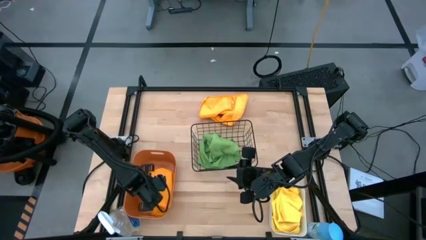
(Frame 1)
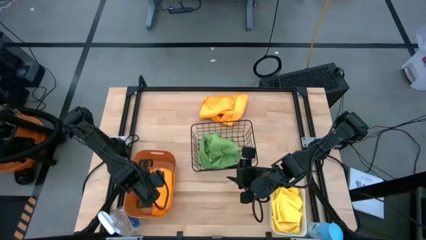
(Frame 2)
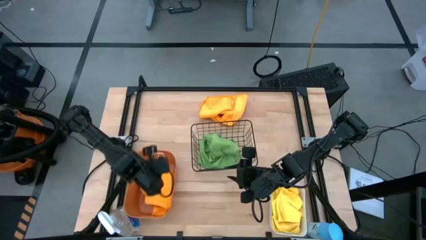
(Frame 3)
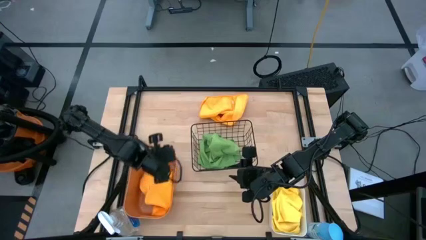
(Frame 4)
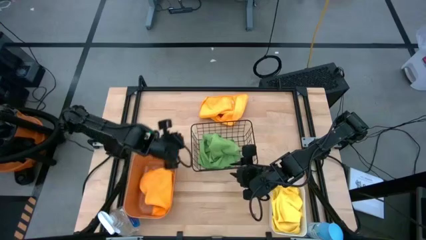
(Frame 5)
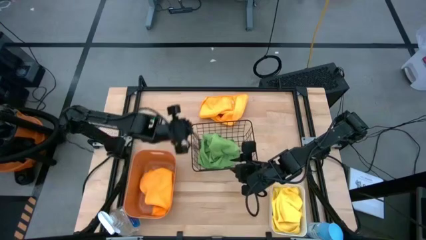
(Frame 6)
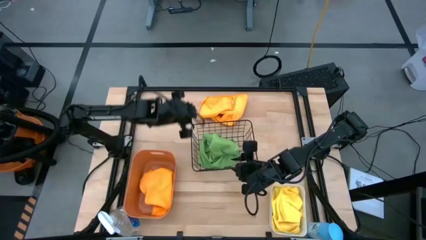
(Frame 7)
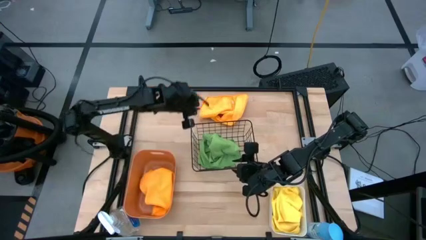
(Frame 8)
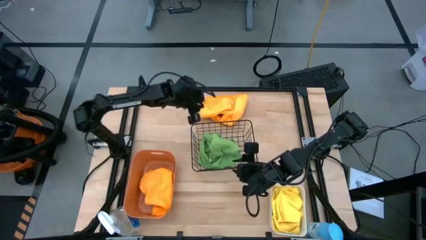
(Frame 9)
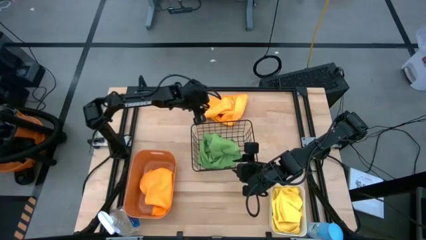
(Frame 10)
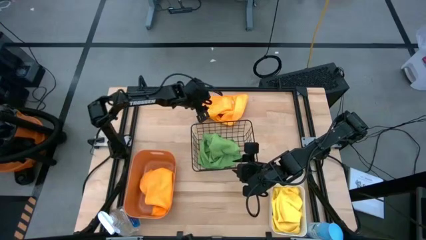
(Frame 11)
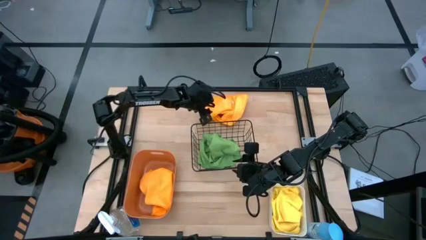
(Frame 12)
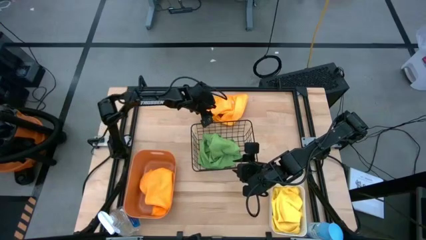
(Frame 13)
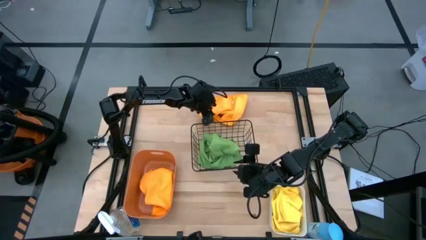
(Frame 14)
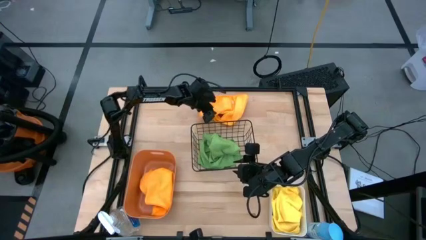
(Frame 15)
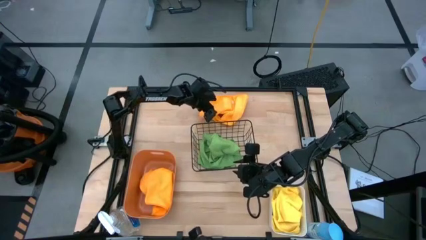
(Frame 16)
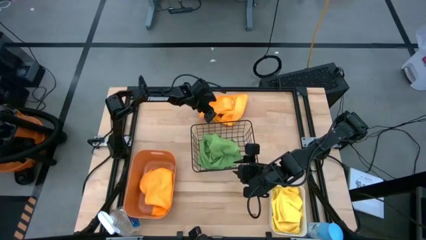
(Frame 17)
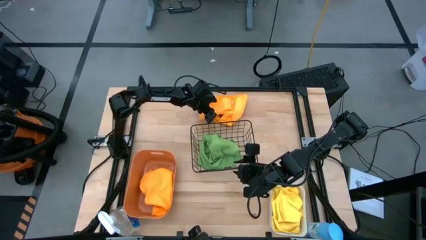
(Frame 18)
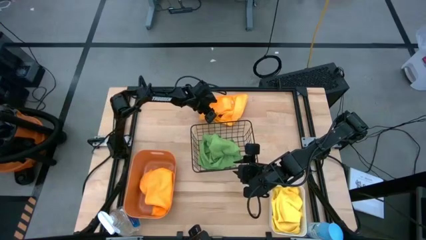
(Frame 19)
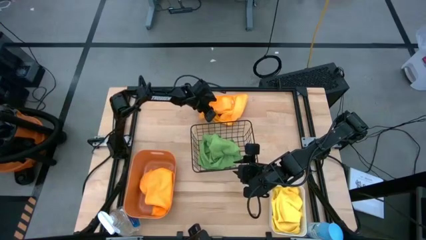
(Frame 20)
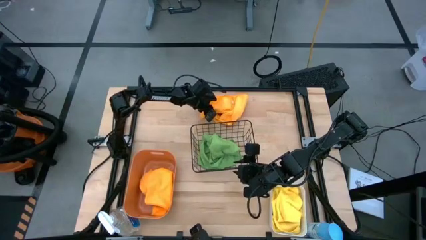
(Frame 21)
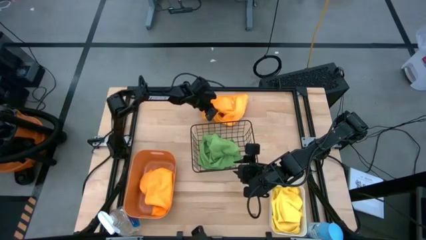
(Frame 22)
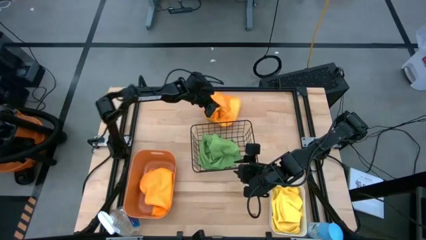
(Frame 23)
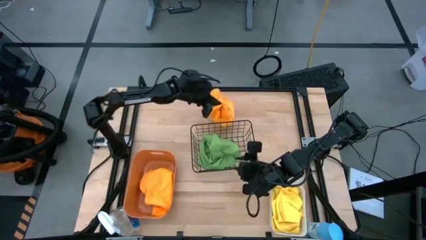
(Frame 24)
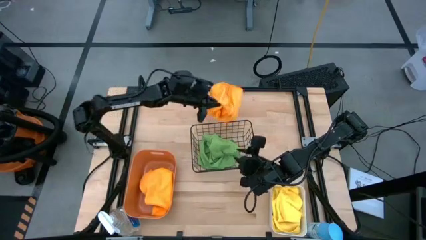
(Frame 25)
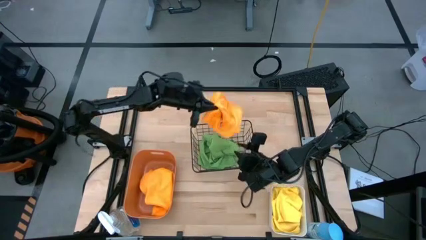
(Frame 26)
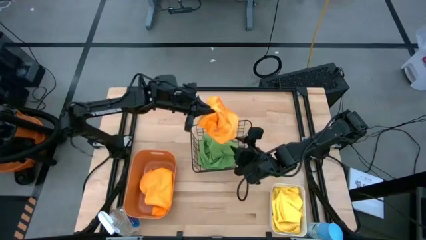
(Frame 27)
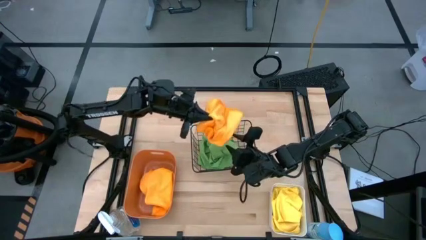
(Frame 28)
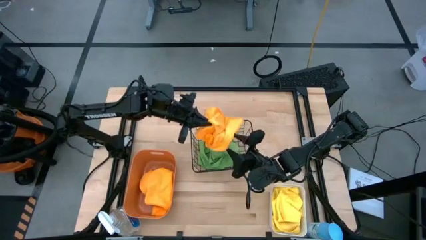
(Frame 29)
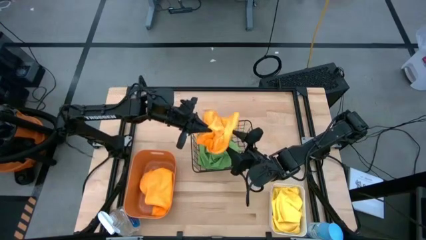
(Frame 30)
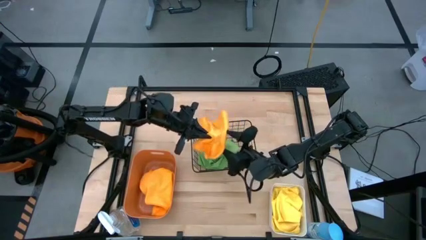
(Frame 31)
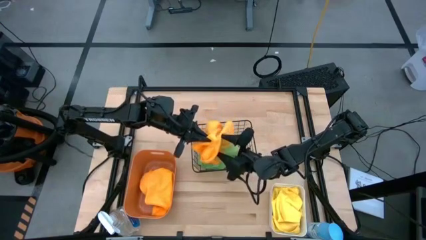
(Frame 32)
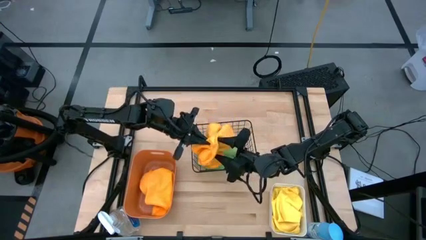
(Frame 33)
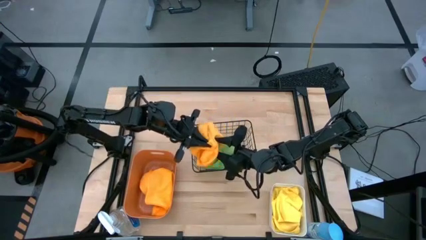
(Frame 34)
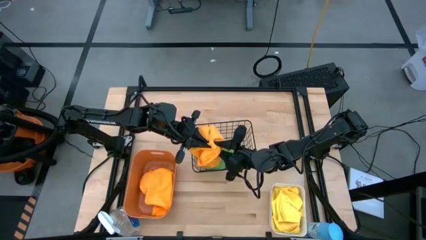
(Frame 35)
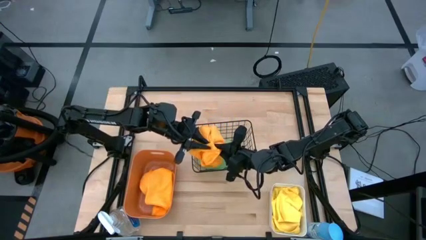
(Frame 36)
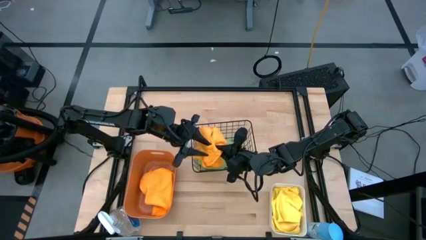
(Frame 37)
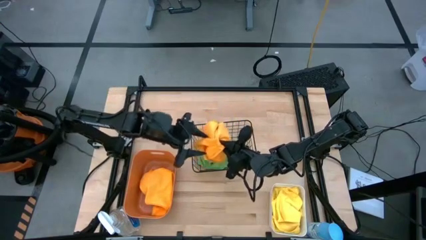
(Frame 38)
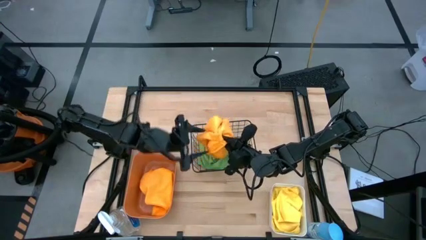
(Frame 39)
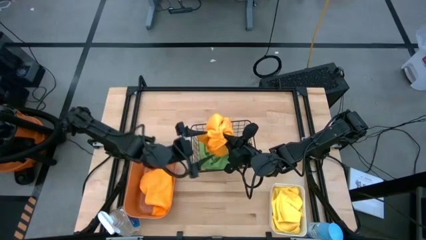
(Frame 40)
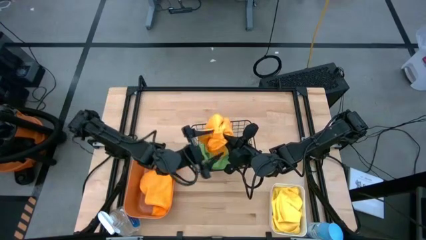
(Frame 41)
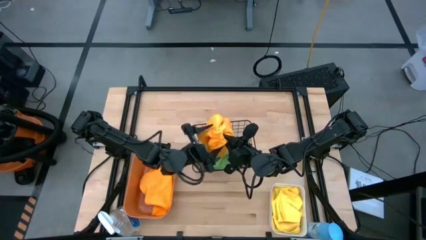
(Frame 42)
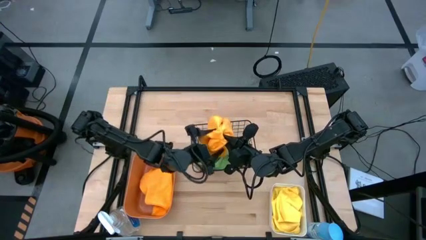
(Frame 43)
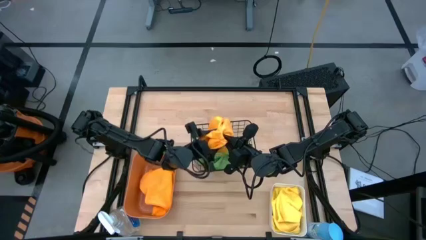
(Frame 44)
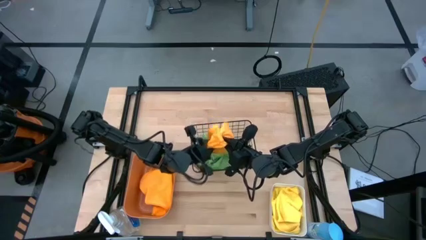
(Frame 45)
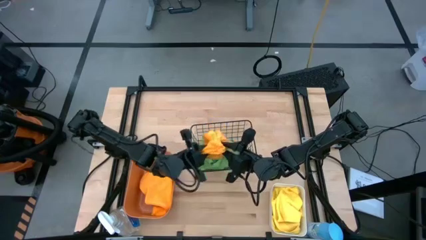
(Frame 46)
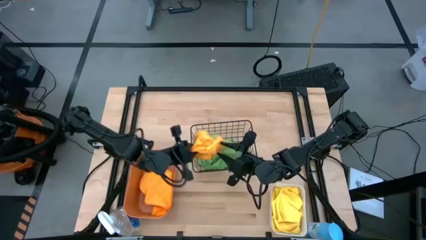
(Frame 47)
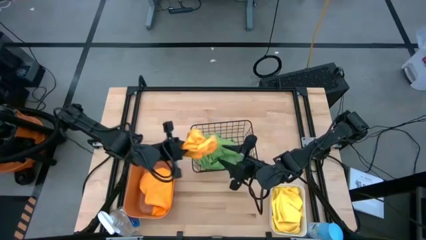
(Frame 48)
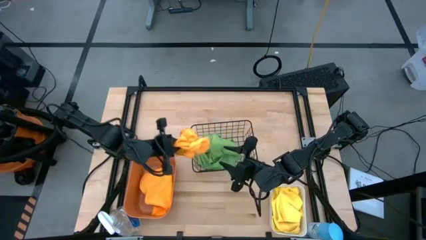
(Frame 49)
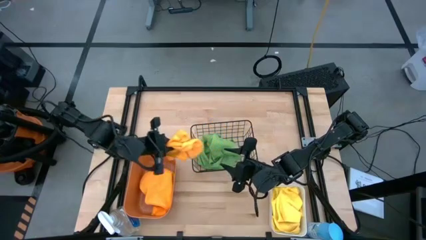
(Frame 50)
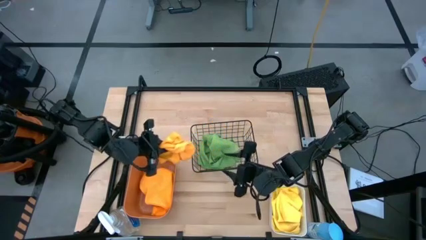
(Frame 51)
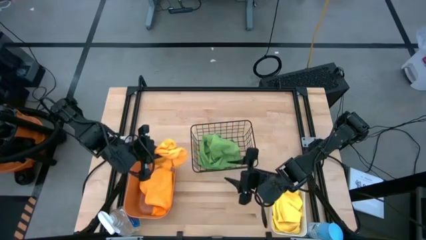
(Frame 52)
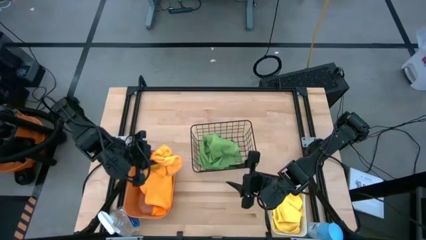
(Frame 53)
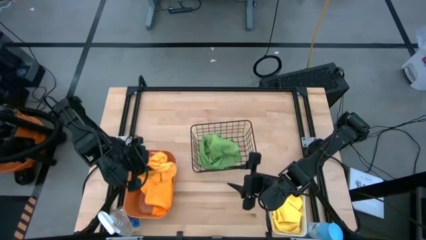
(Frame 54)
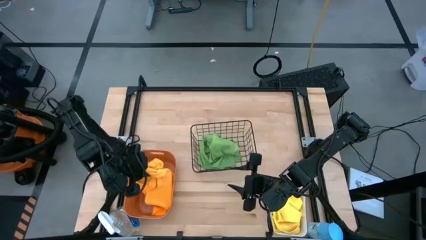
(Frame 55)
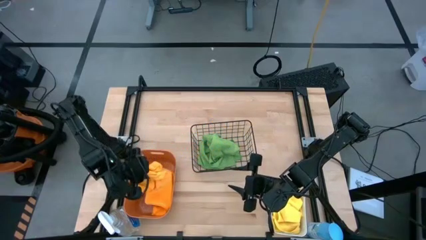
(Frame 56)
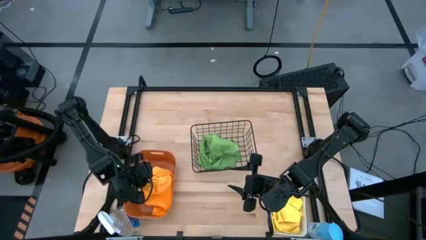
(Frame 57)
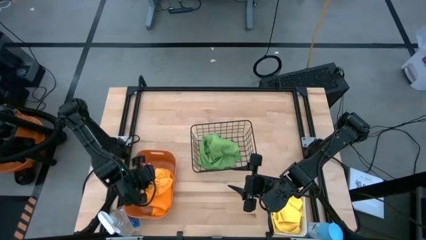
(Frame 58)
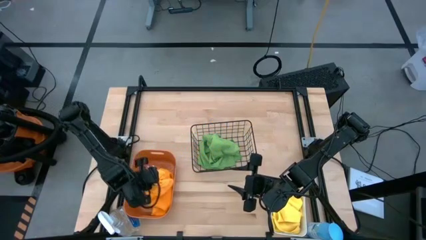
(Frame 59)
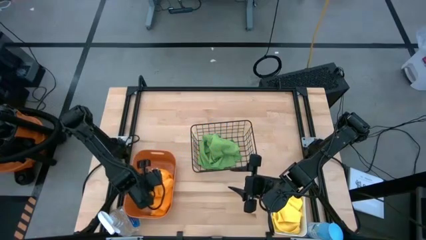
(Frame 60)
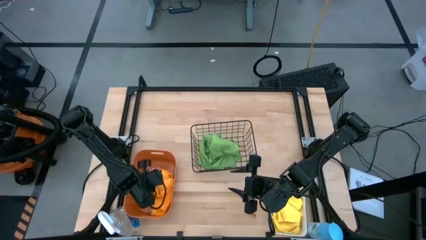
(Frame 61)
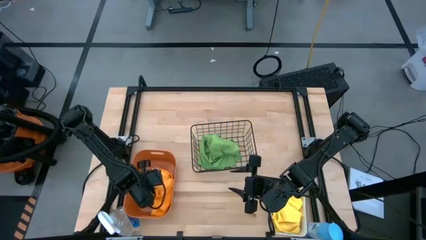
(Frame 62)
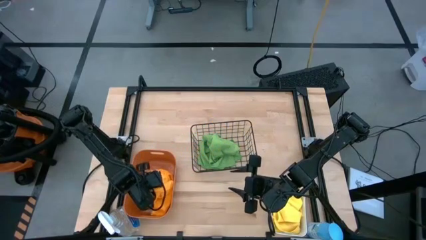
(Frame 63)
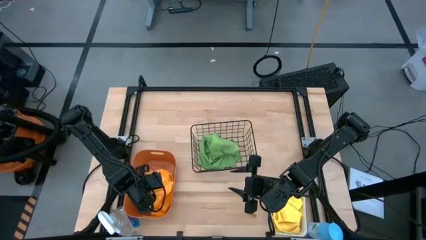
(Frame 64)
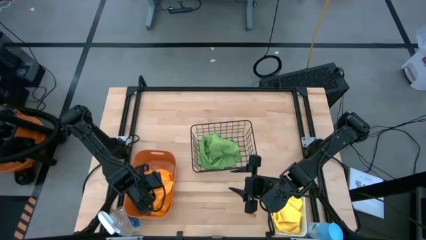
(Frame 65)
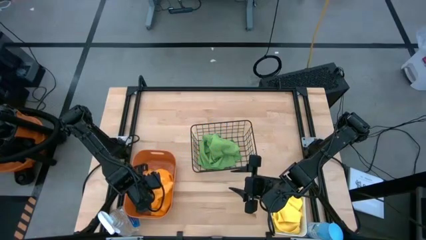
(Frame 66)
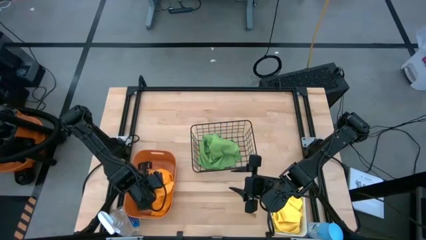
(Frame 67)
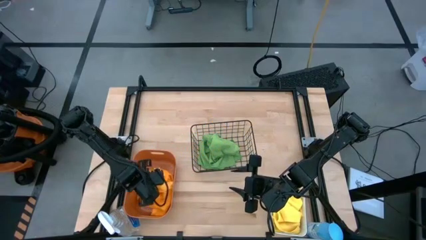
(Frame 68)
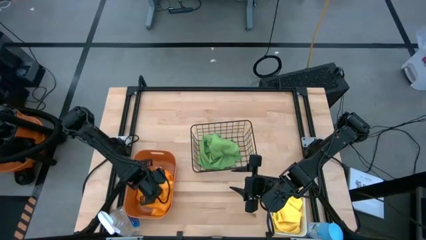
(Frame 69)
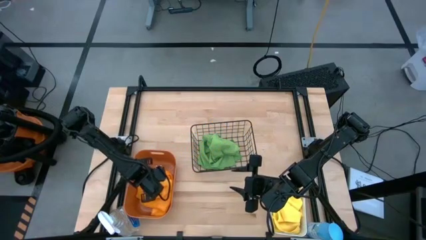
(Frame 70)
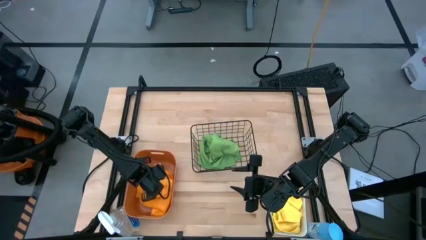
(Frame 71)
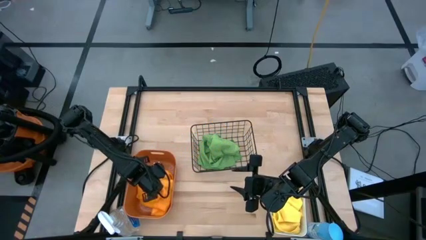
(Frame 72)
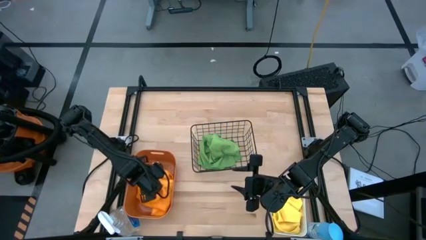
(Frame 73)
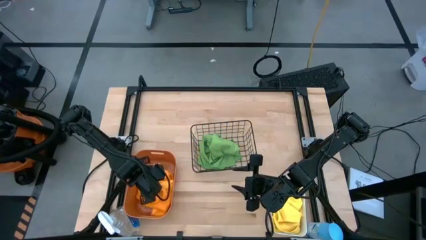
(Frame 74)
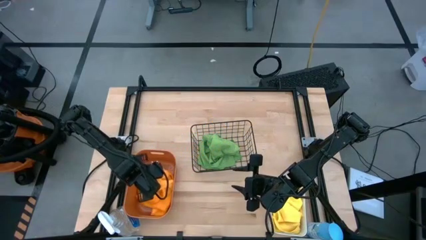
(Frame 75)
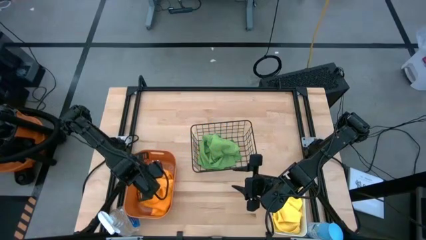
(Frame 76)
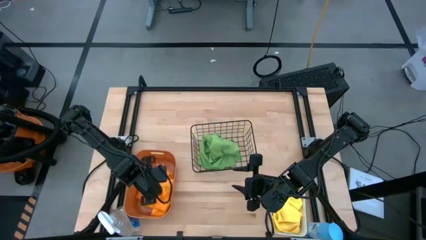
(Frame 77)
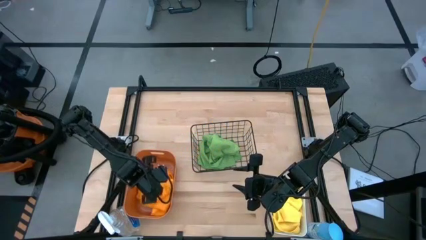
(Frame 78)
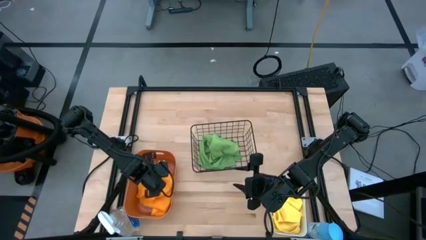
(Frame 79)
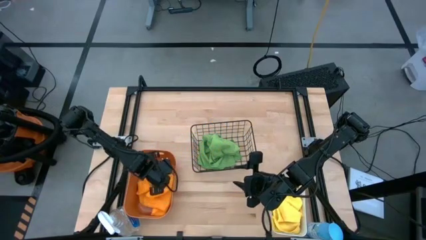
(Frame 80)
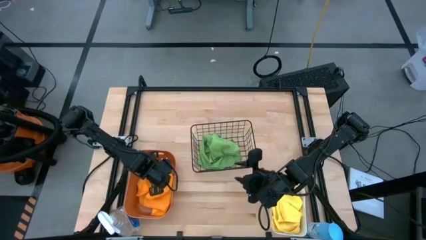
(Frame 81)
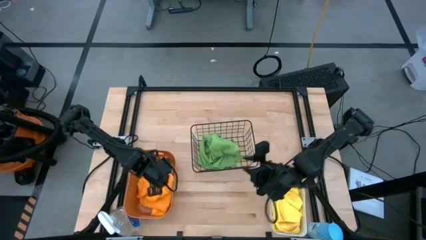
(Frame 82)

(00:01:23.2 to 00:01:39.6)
Task: Sort microfiber towel by color & place in baskets
Put the orange microfiber cloth into the orange bin
